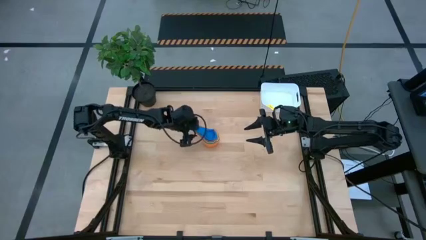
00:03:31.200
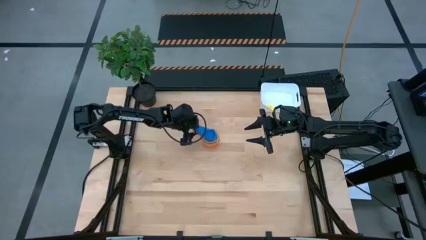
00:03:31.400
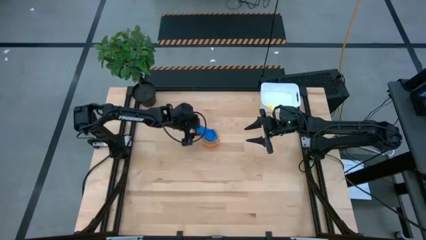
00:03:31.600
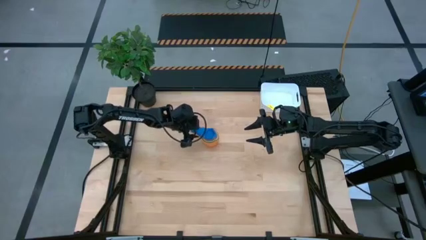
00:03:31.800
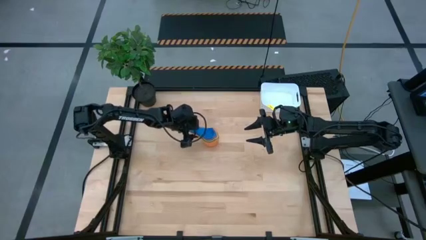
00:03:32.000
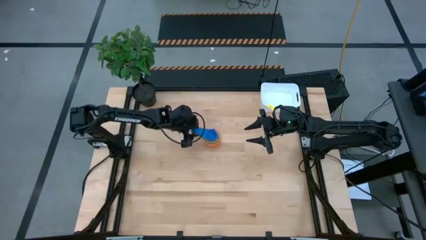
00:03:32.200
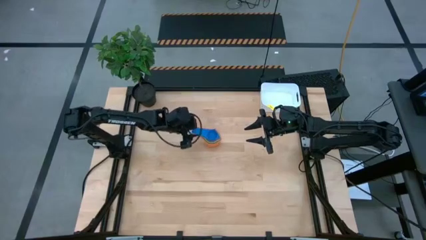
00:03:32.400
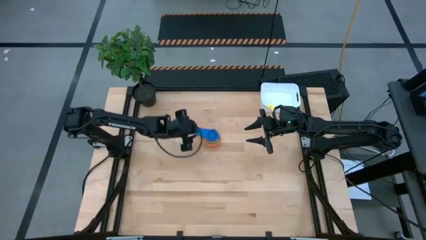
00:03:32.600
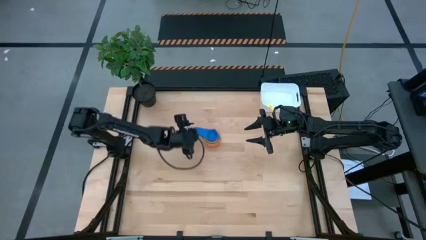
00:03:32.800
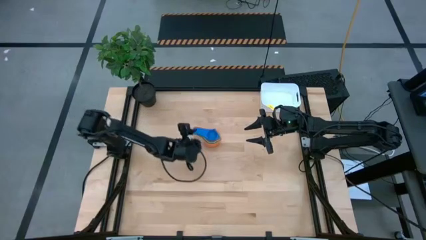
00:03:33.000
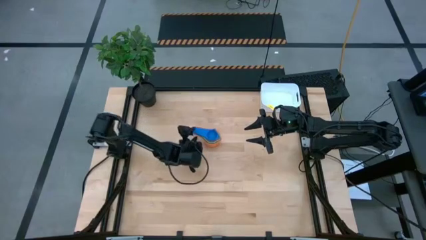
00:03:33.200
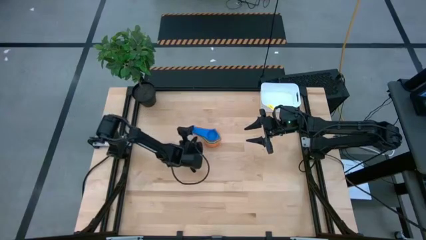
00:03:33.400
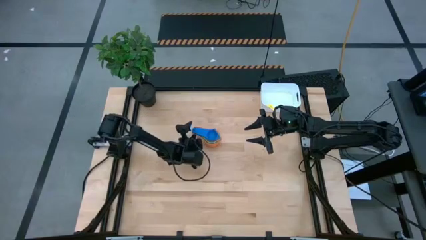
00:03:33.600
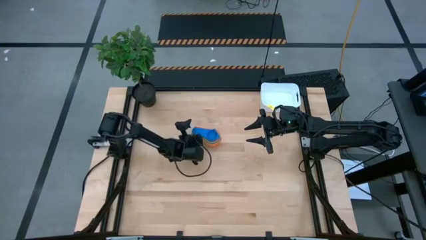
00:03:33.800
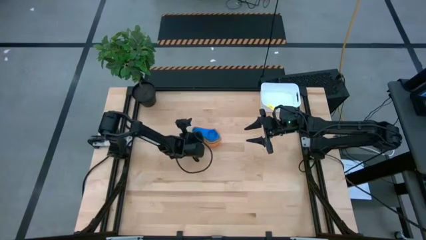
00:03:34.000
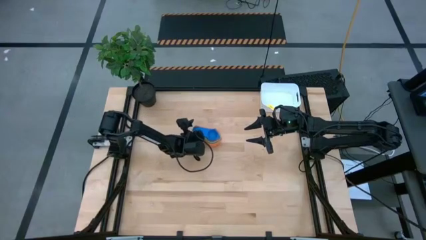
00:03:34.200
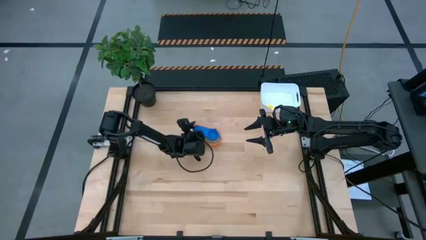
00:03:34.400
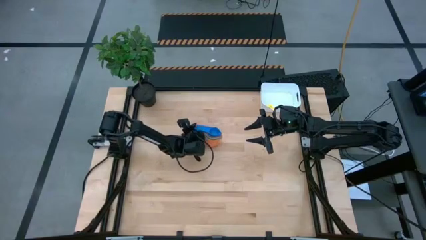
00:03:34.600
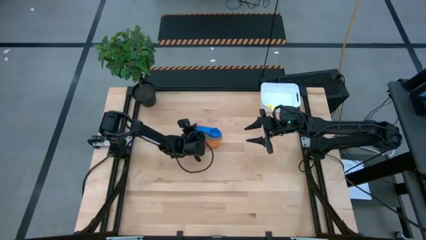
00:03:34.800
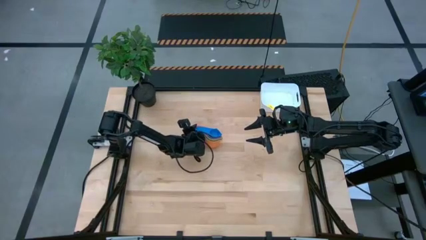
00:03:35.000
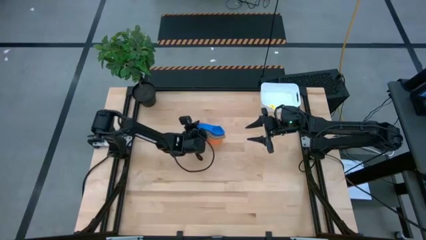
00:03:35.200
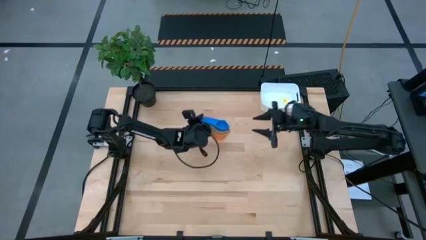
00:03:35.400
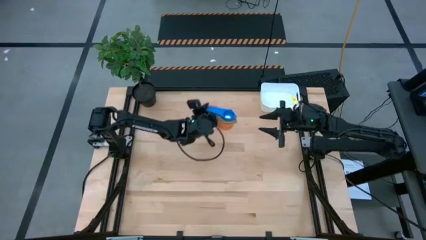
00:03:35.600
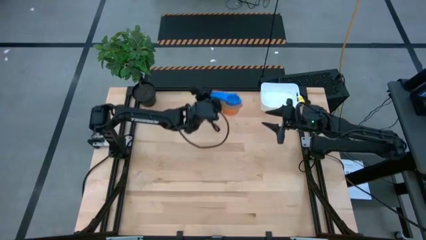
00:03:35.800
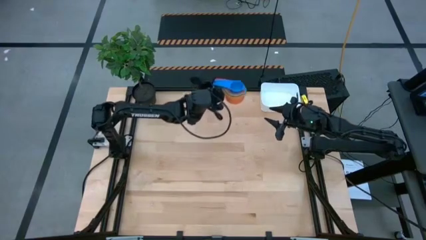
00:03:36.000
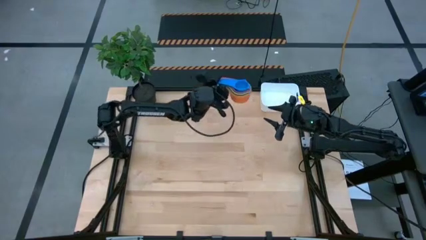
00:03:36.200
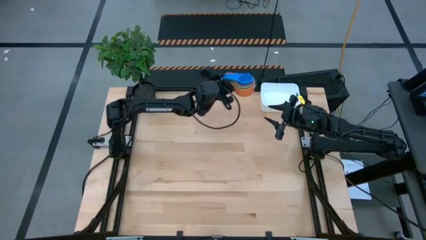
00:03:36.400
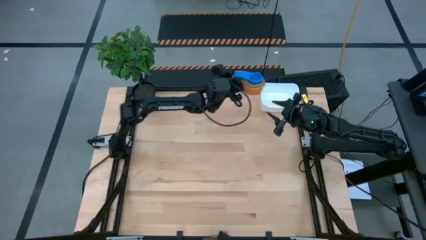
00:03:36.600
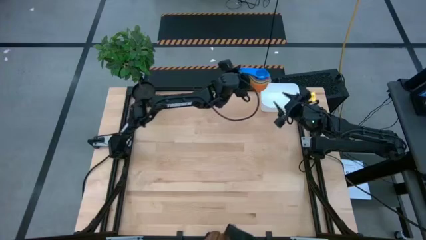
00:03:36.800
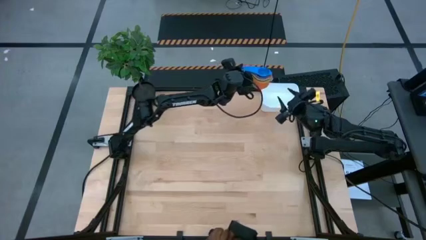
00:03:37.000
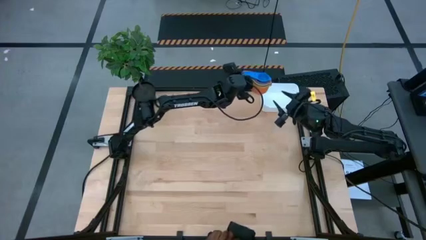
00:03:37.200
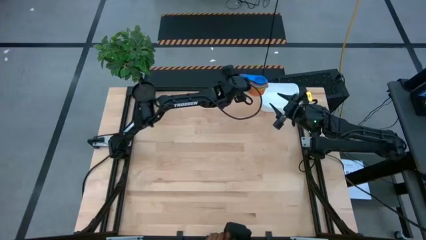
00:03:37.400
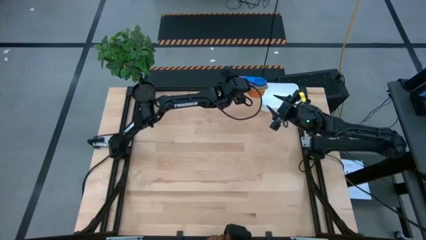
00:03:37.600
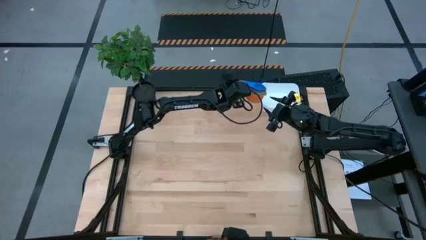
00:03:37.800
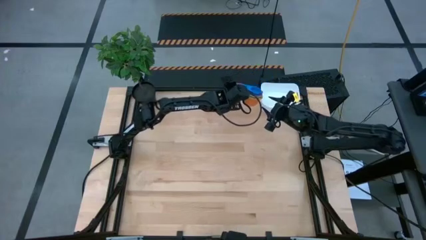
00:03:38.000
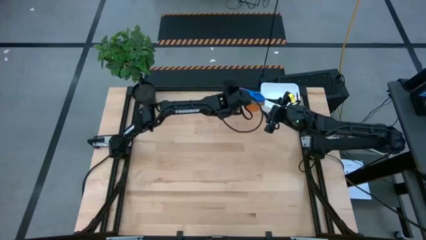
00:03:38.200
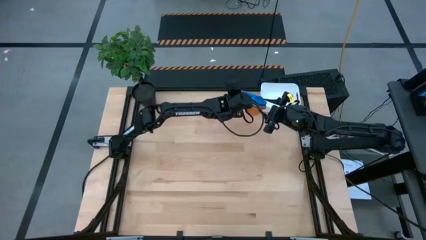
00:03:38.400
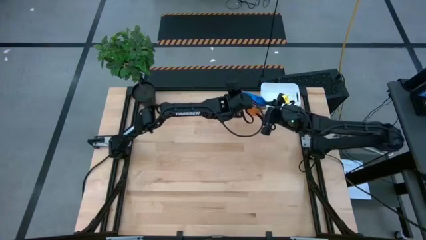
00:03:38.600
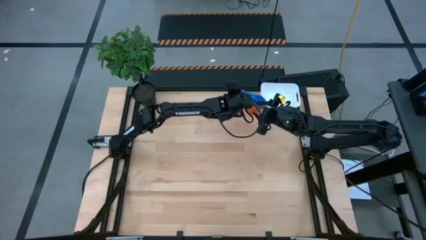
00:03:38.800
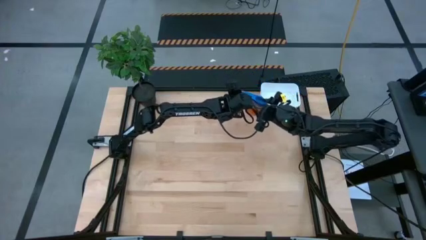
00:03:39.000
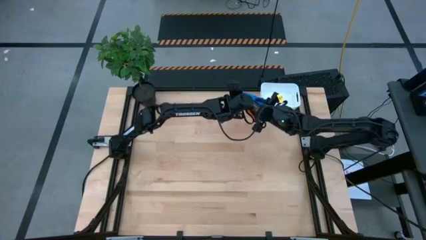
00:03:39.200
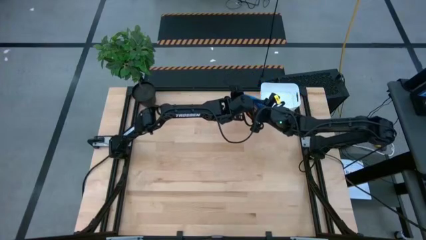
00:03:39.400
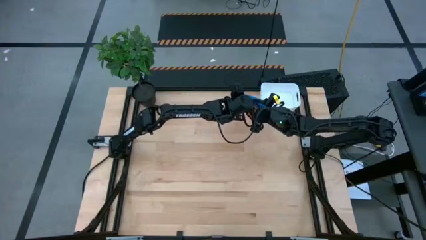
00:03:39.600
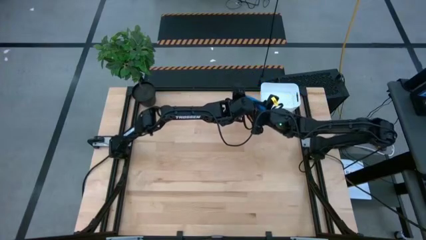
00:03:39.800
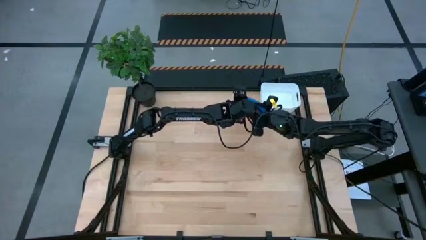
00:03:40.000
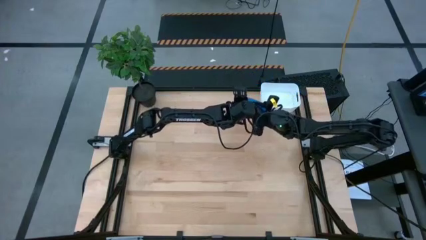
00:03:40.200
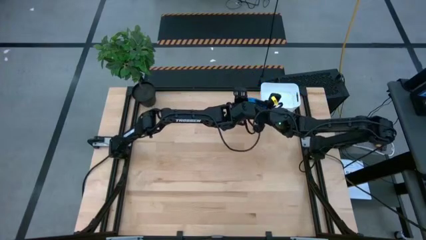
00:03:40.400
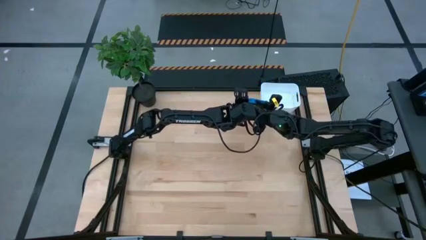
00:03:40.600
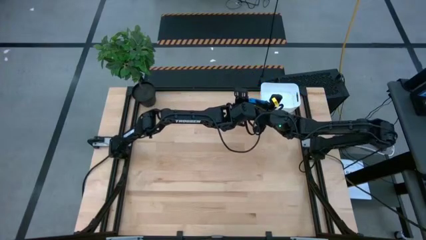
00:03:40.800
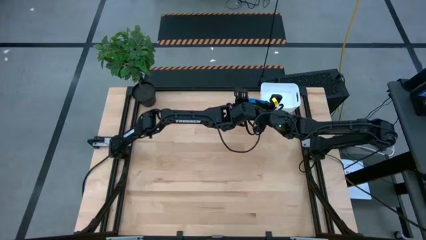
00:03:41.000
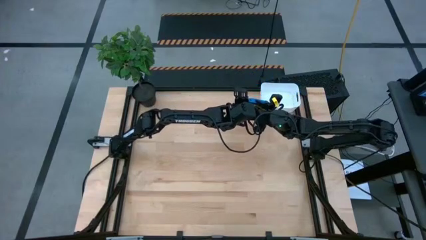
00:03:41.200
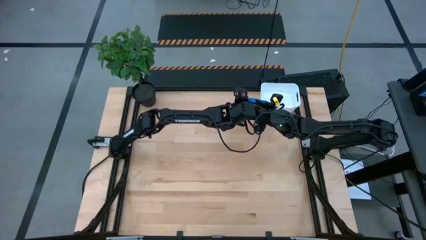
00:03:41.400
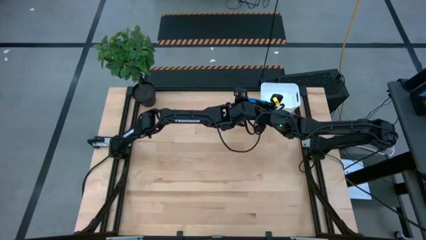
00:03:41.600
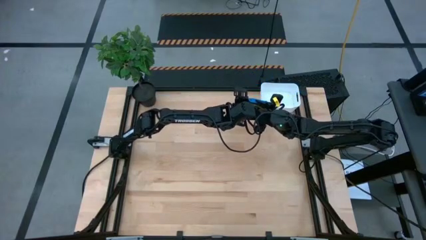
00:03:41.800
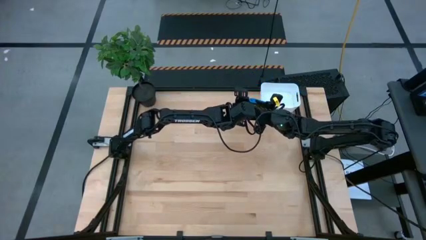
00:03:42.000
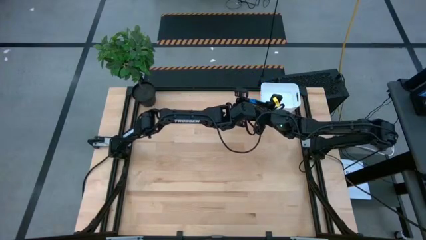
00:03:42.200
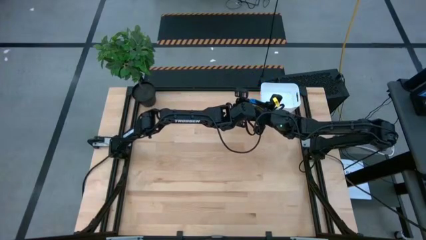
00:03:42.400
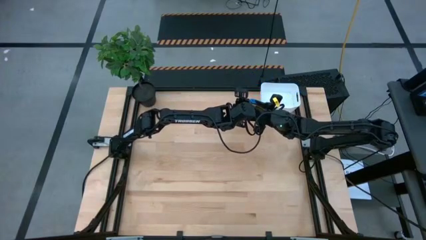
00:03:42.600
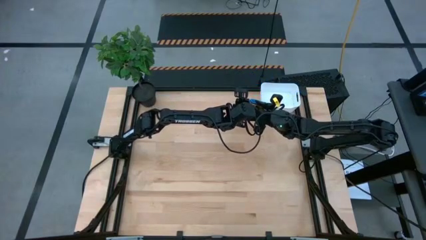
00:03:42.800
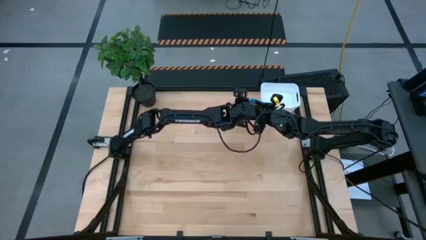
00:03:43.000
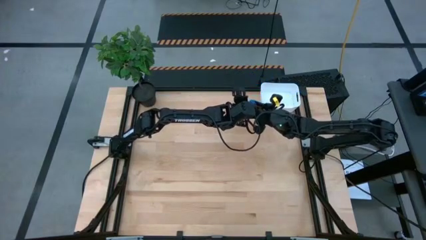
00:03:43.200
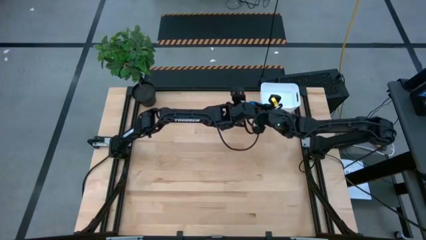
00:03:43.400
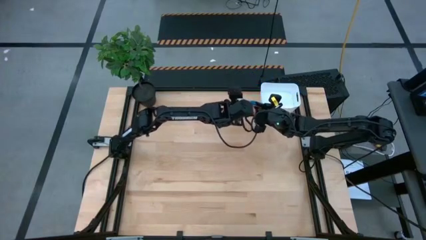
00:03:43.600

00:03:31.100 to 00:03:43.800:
Task: Nest measuring cups in basket
Put the stacked measuring cups into the white bin
